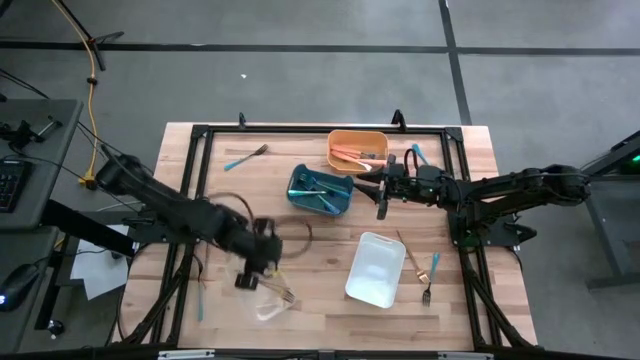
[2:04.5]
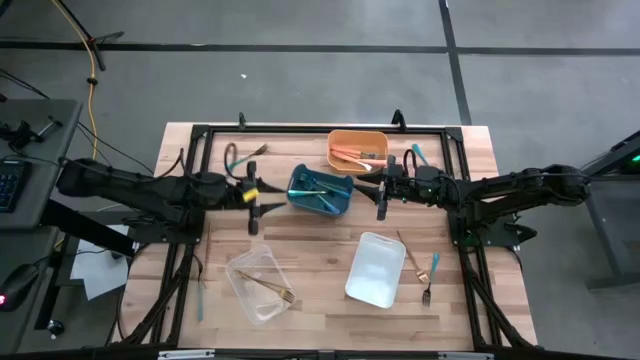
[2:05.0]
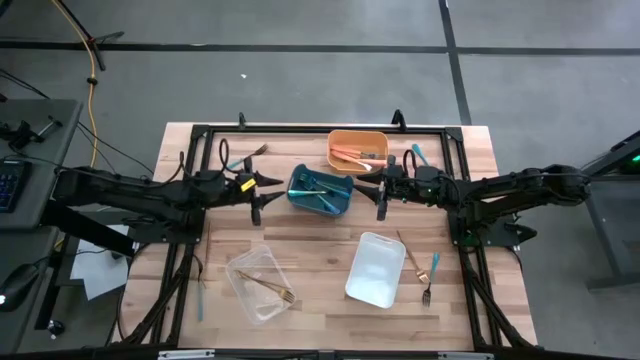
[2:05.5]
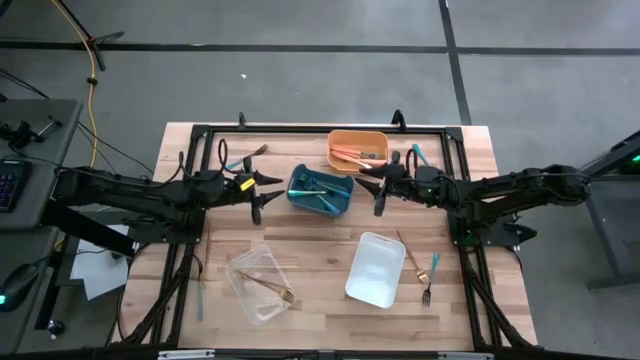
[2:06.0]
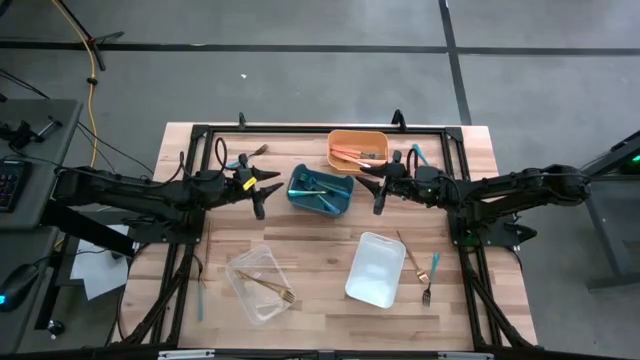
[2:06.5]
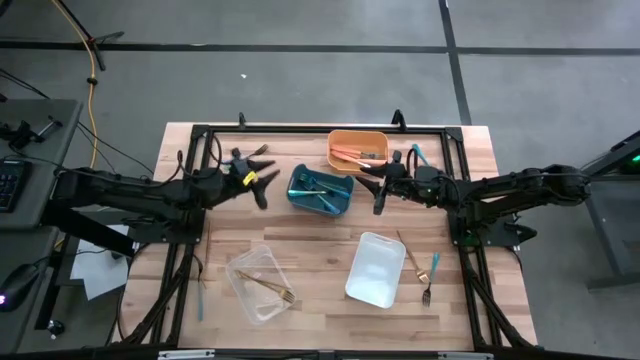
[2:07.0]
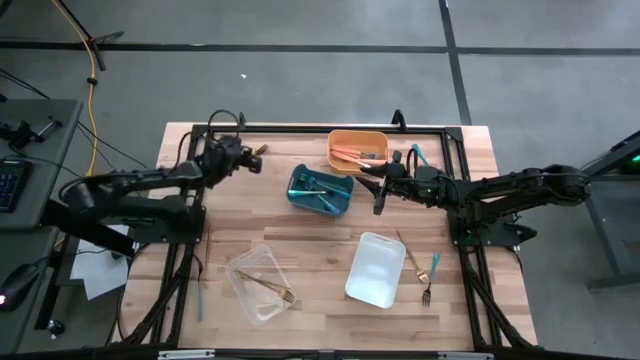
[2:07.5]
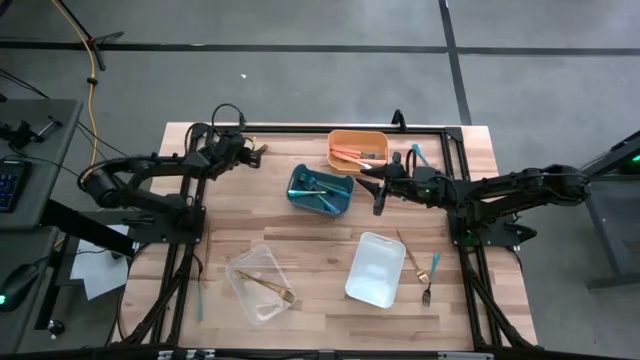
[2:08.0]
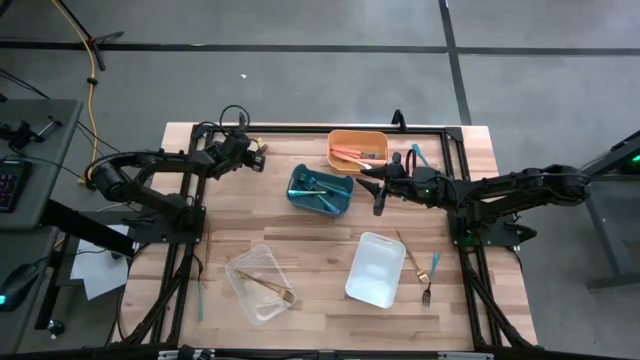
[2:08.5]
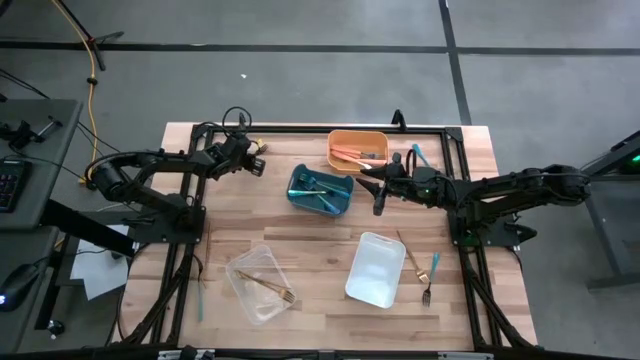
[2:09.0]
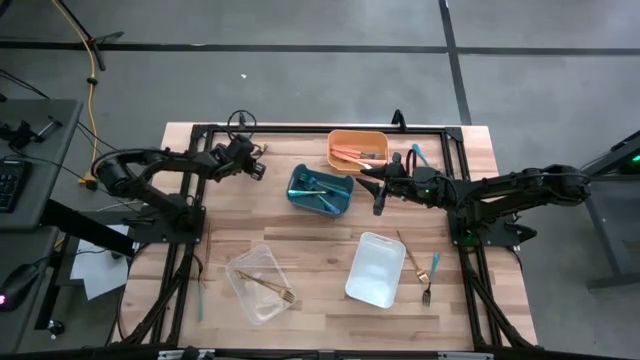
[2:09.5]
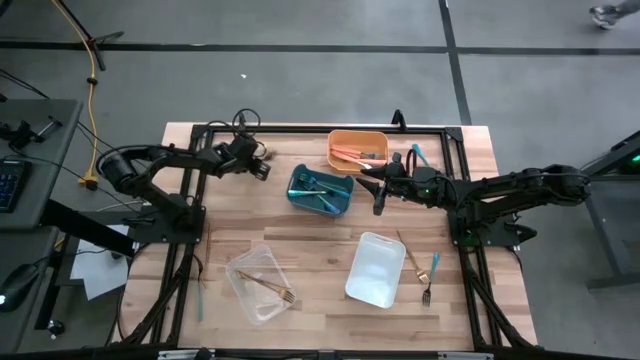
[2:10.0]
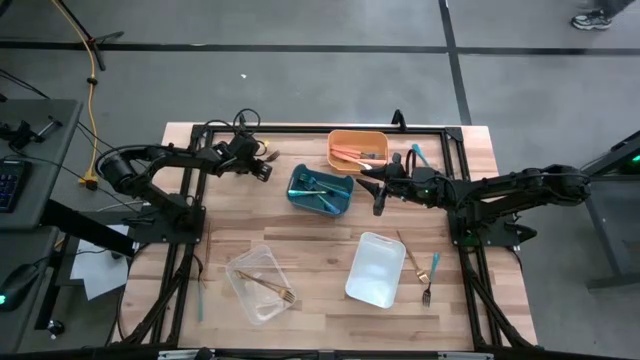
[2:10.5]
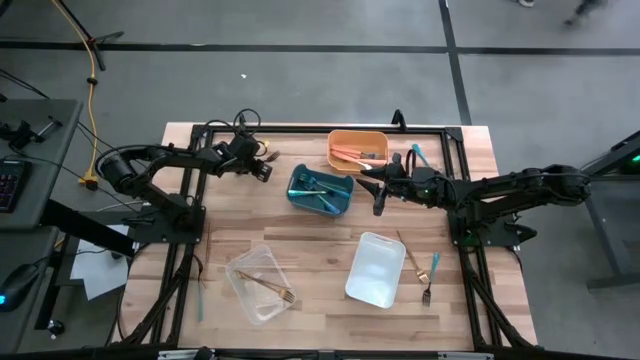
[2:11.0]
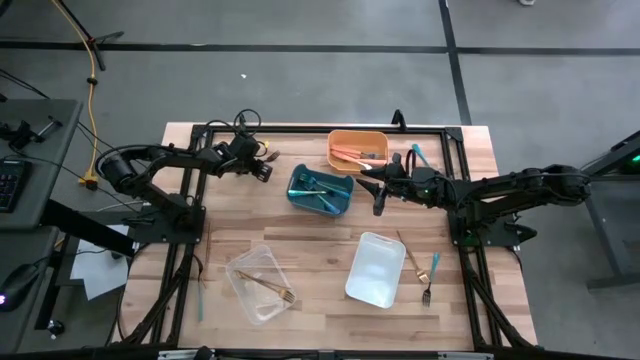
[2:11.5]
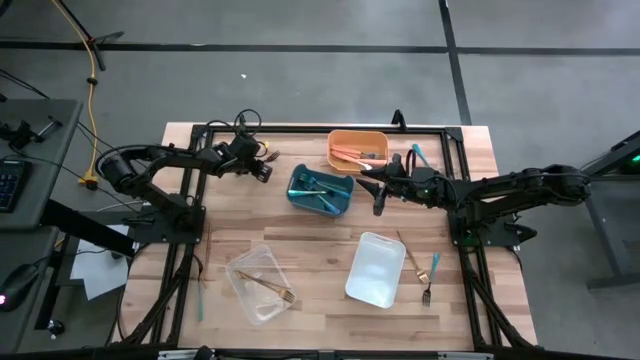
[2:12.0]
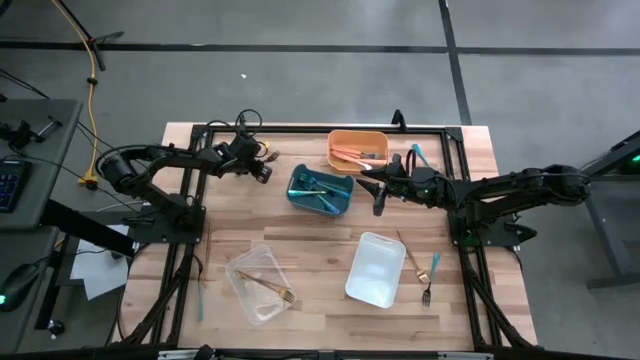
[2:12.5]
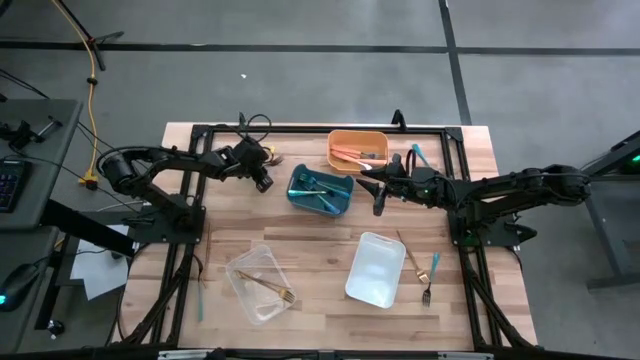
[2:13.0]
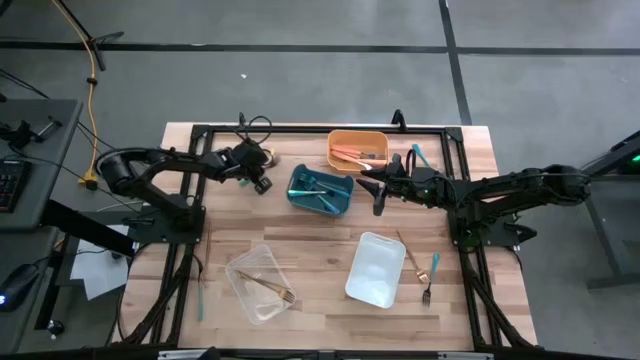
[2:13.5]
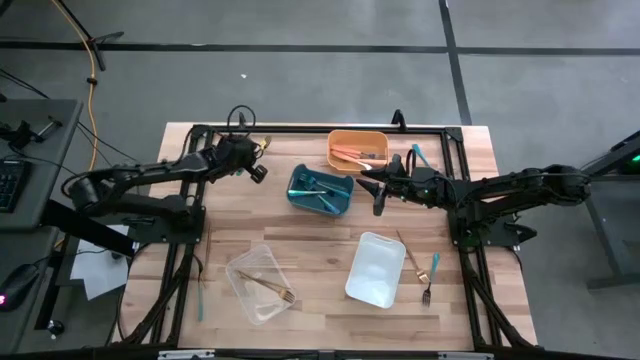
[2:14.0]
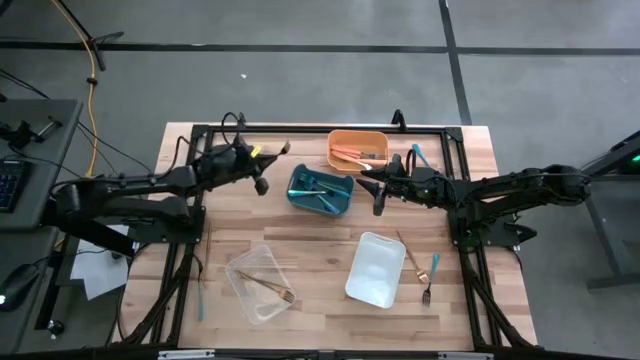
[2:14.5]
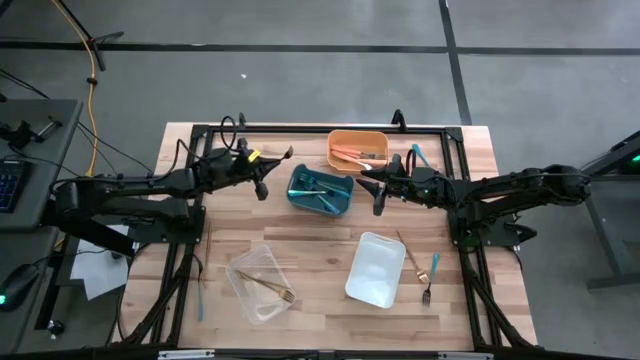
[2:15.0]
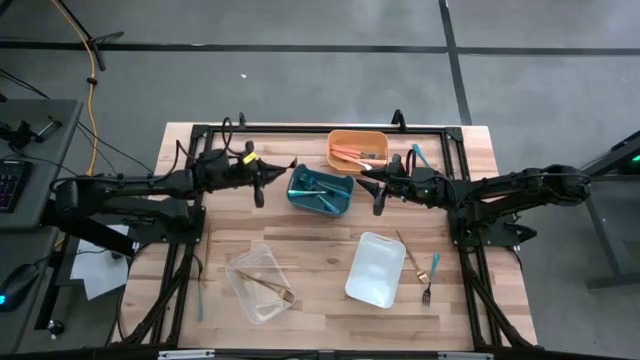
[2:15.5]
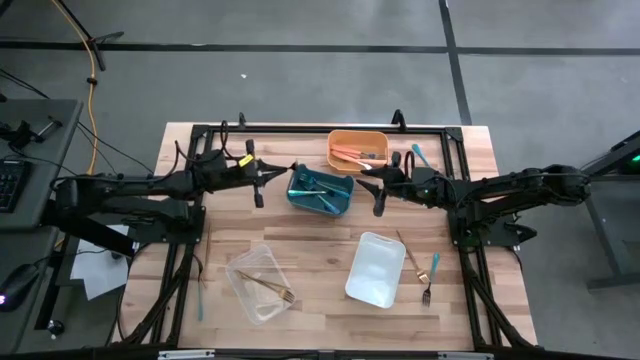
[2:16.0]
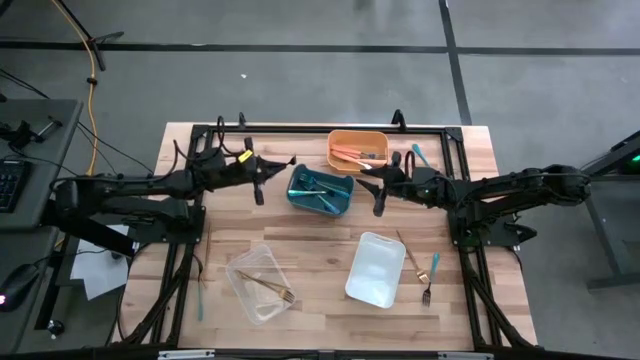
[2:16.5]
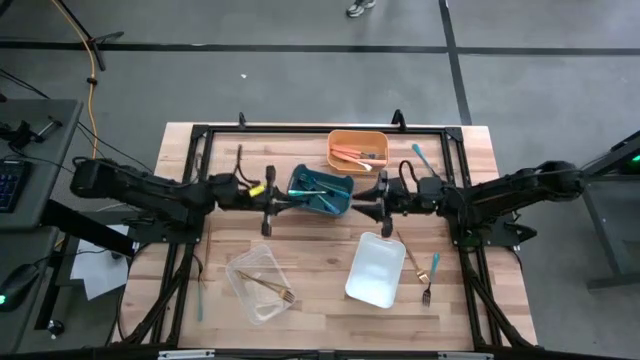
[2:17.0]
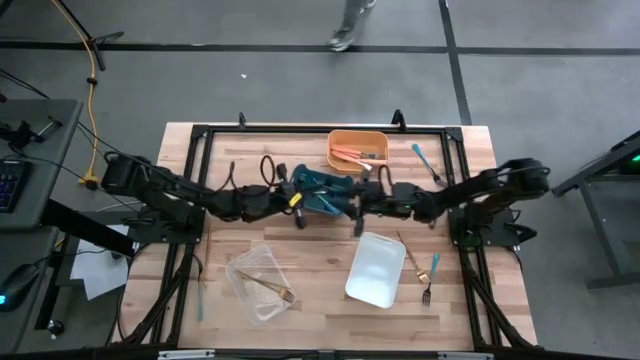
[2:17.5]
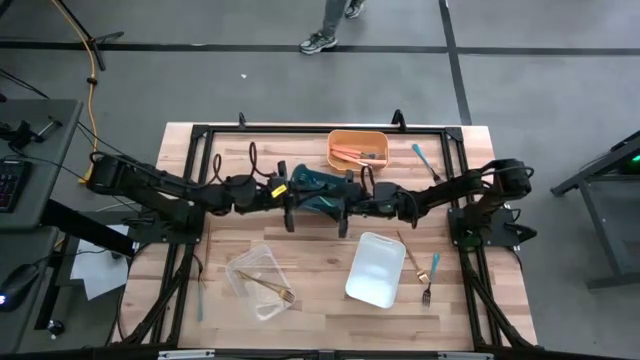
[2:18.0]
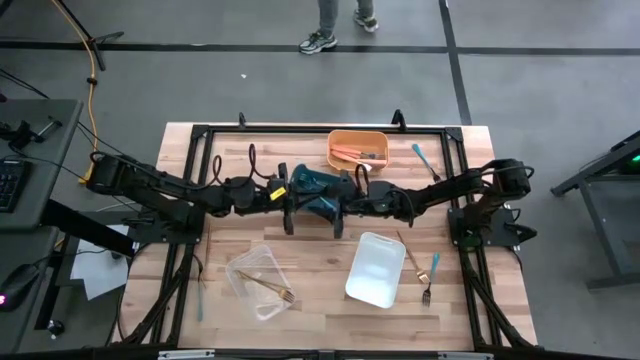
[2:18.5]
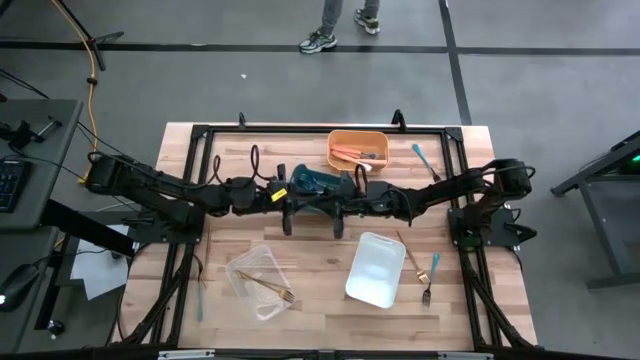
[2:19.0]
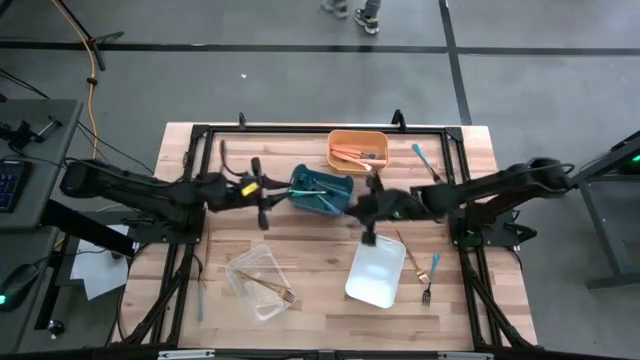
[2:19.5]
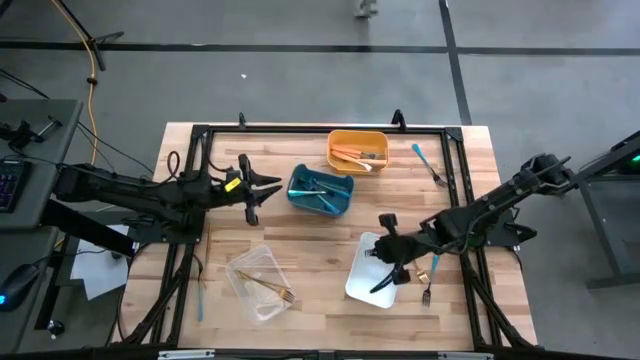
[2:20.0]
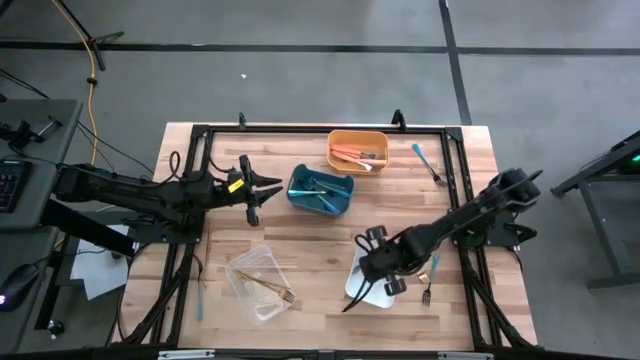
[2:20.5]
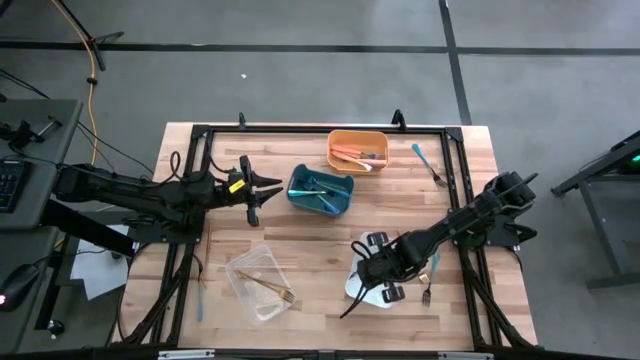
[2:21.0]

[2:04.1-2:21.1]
Task: Sort silverware by color (type)
Put the blue-black fork into the white bin

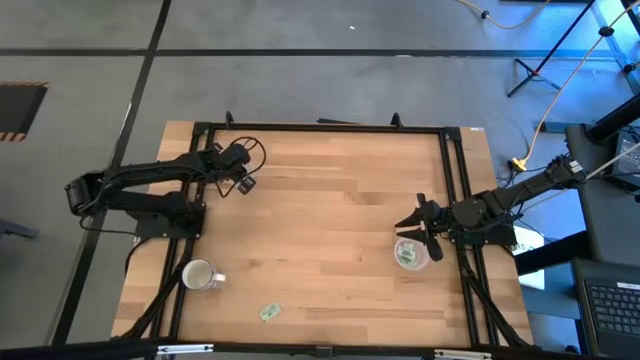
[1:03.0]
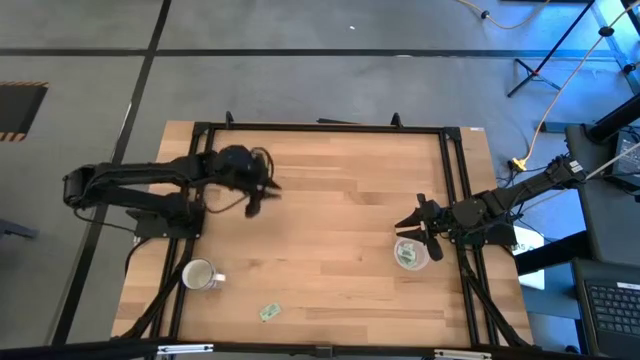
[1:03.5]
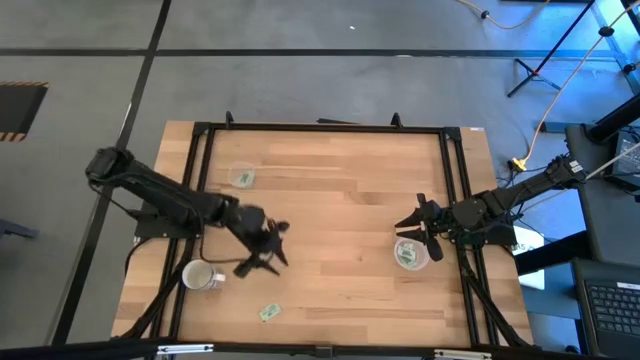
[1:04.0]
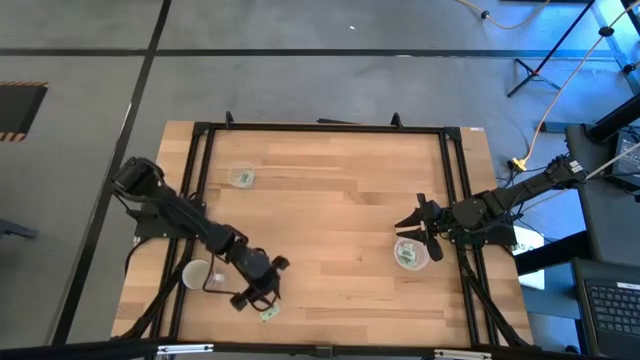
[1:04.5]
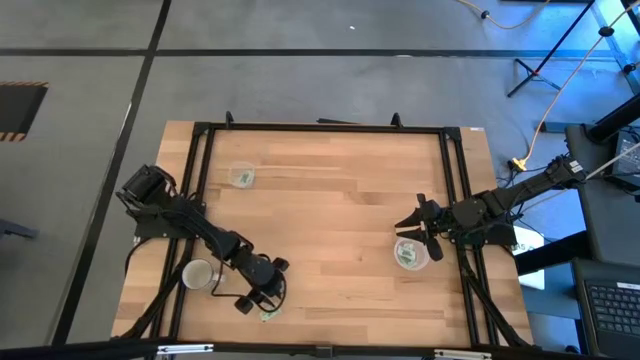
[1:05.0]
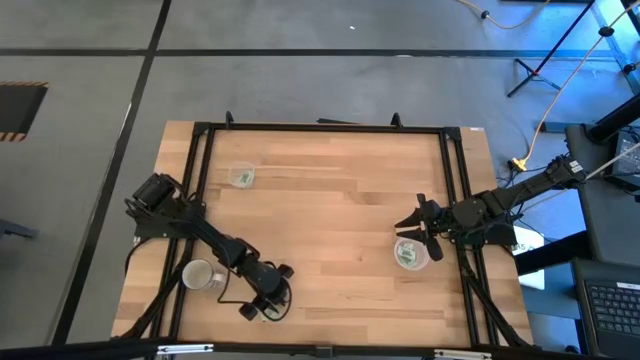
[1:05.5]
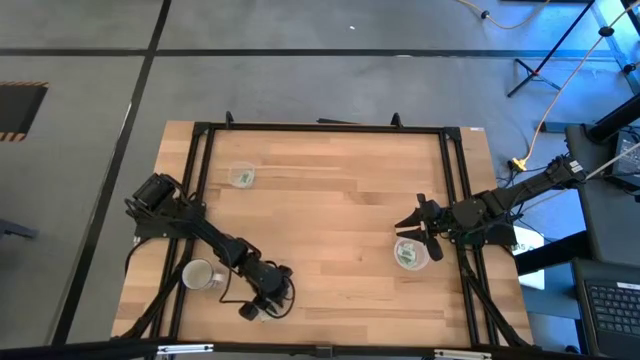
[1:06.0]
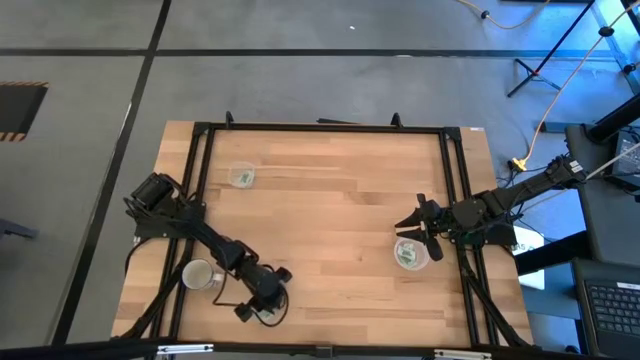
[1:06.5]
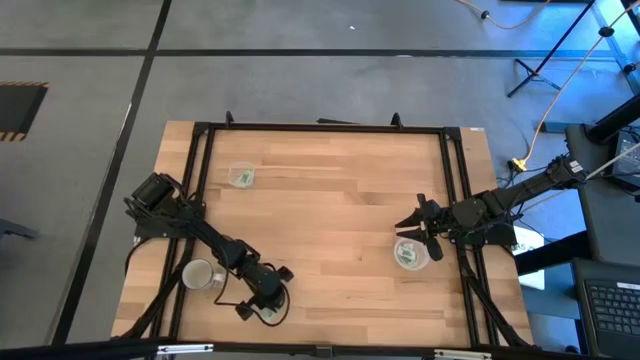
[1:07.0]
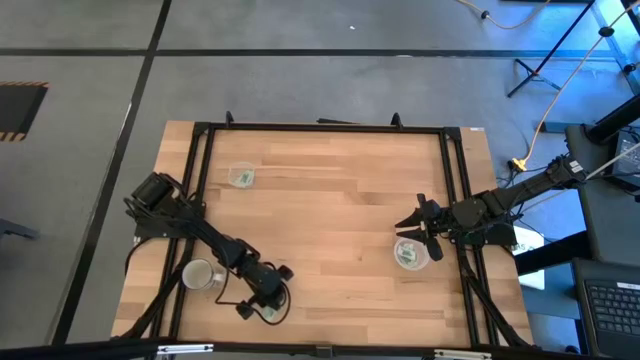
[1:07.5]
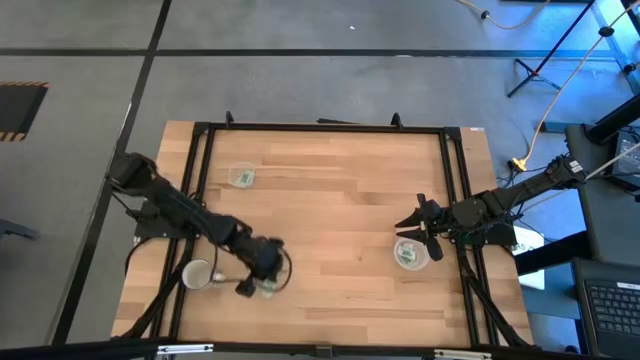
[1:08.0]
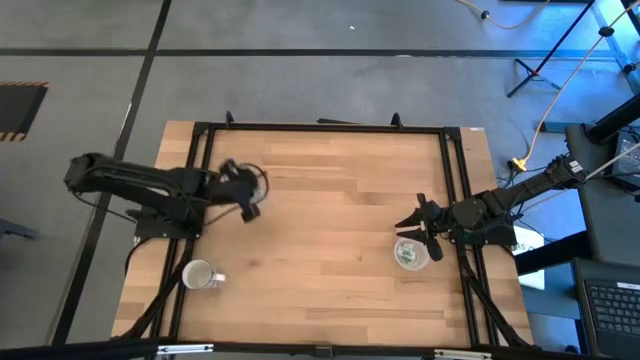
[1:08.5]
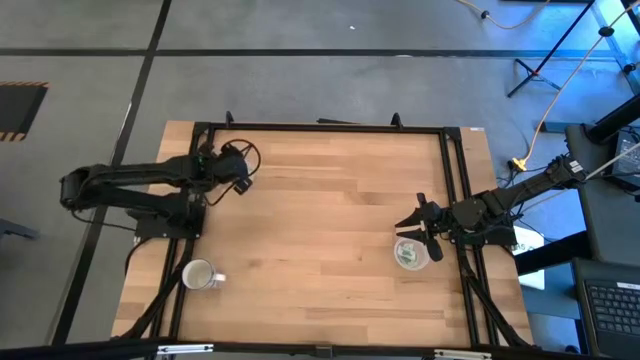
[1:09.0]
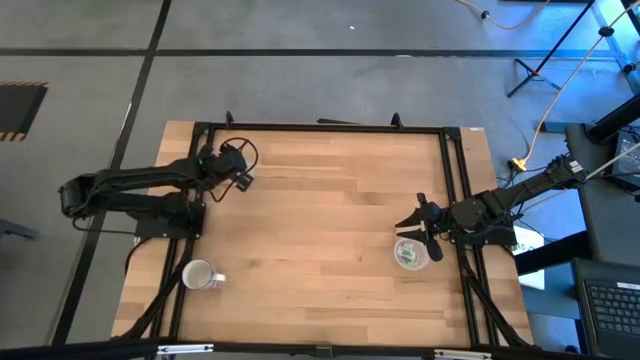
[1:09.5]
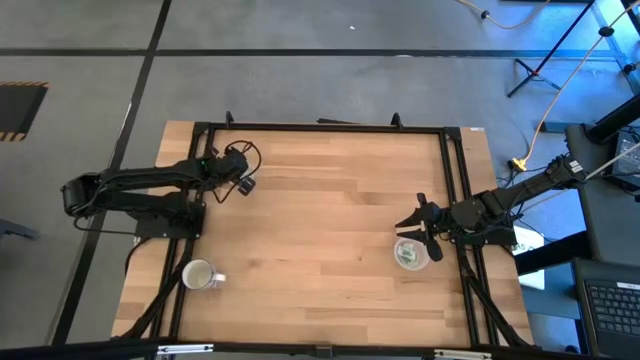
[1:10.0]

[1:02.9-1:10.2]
Task: Pick and place Stevia / Truvia into bins
Put the stevia packet into the square transparent container
